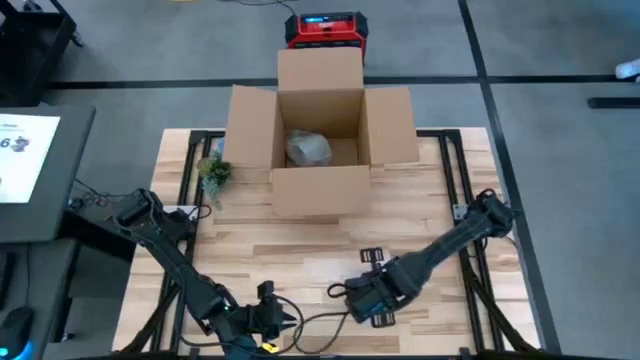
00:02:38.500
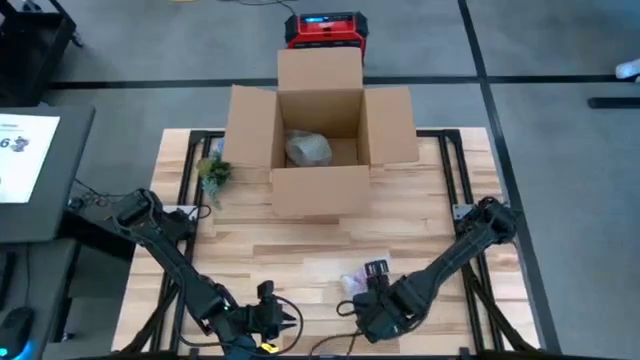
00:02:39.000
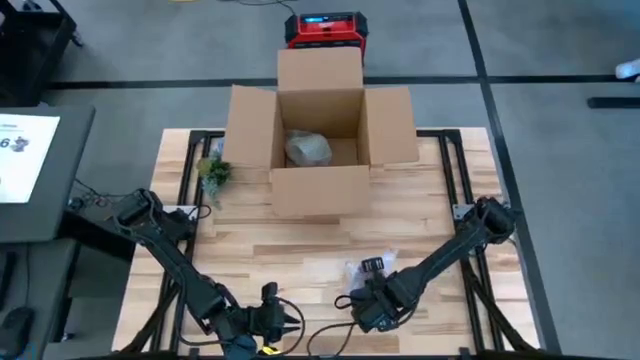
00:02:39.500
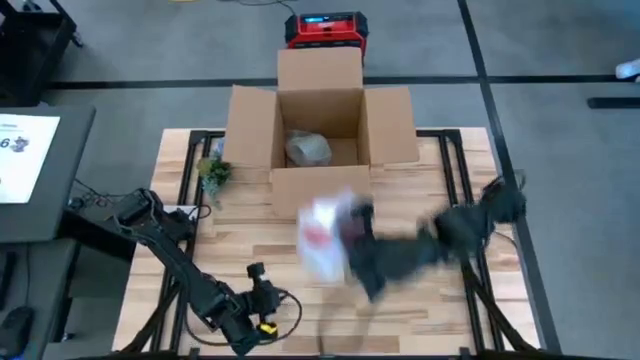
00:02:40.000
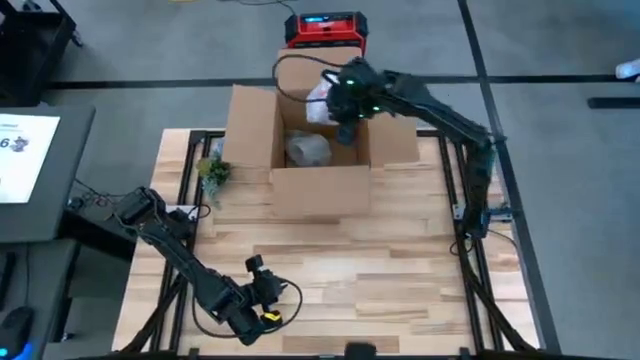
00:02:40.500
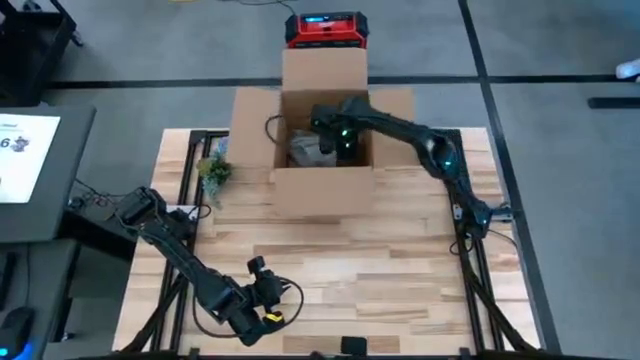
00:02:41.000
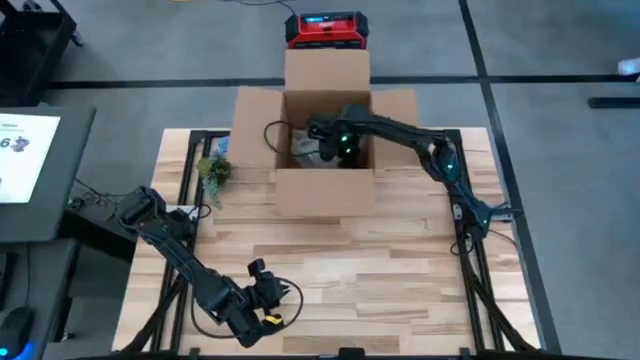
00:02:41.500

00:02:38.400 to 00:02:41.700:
Task: wrap mug
Put the wrapped red mug into the box

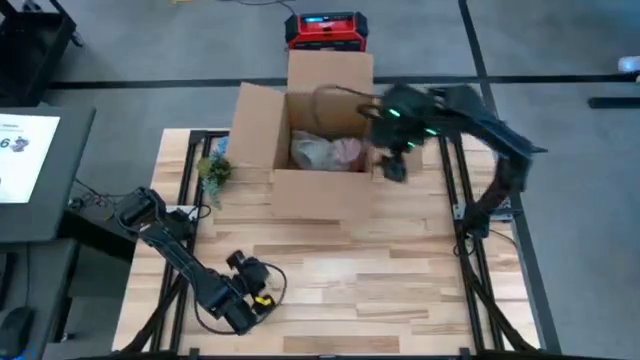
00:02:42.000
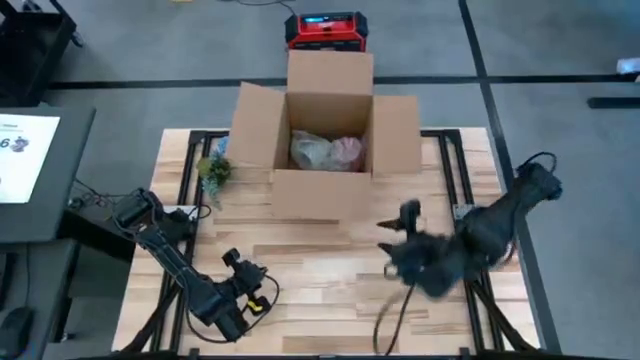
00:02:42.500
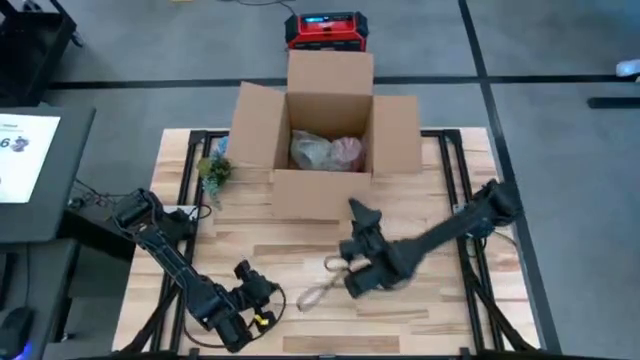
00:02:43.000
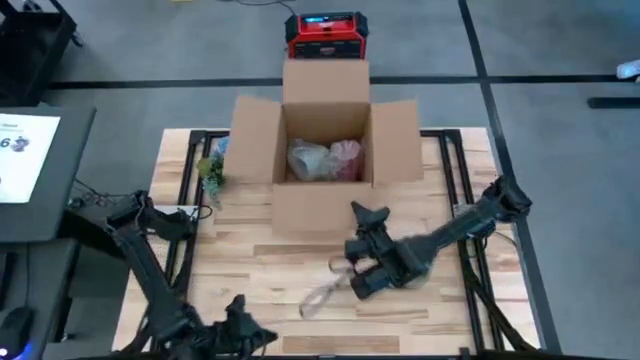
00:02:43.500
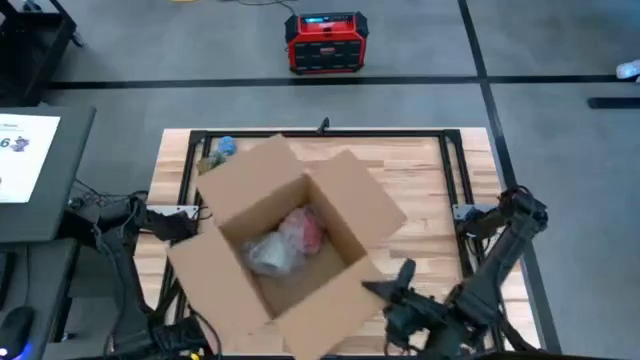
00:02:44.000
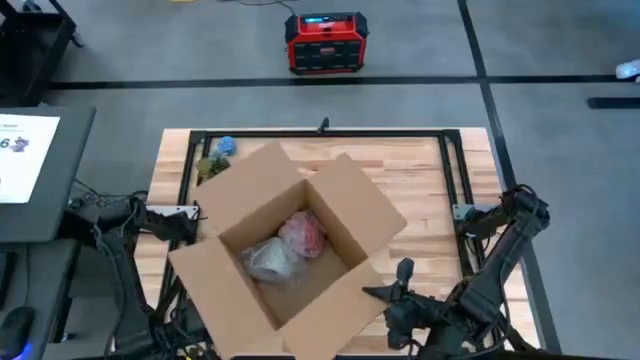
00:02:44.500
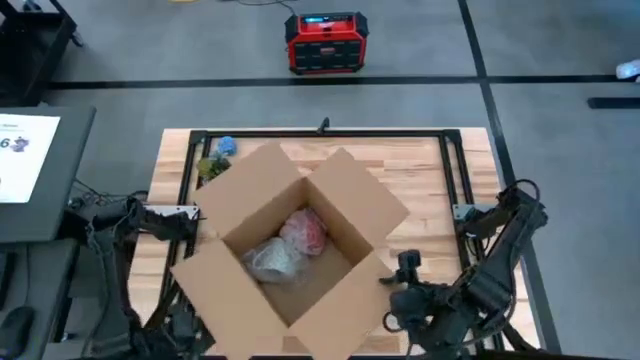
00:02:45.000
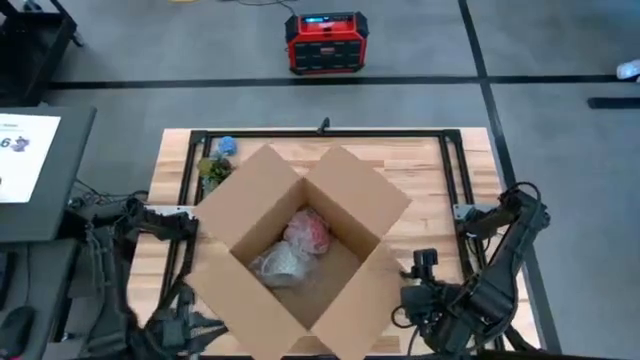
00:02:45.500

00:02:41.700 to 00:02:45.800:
Move the box to the center

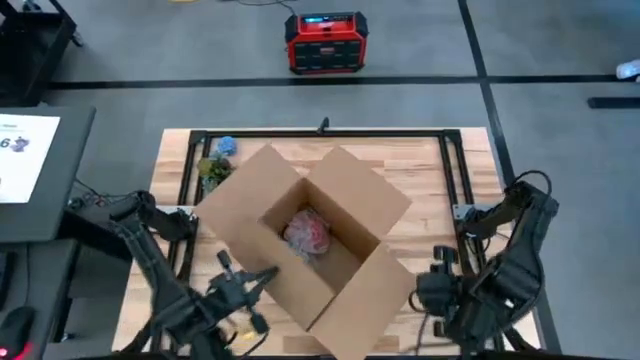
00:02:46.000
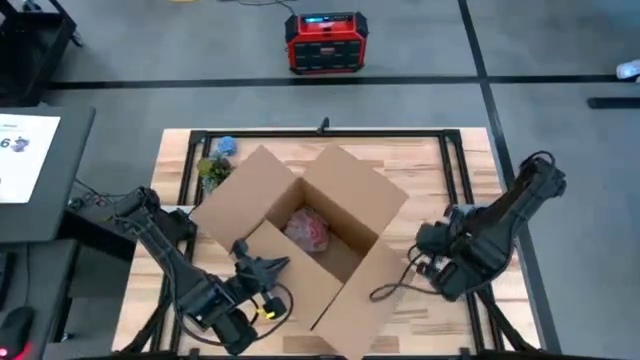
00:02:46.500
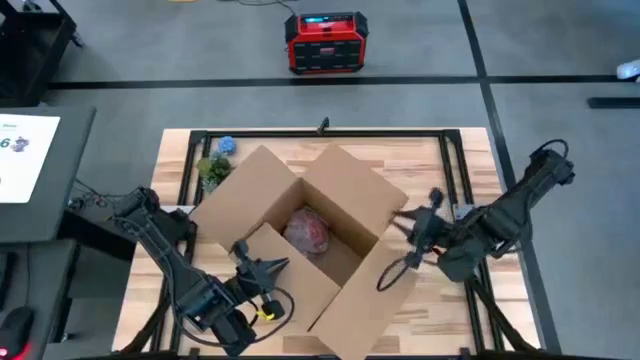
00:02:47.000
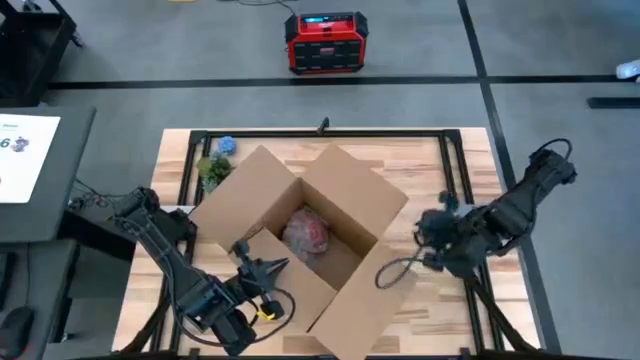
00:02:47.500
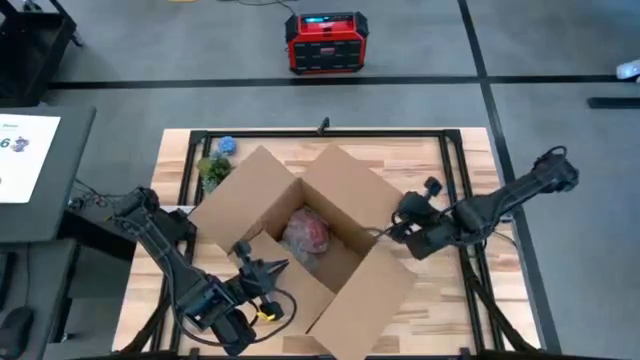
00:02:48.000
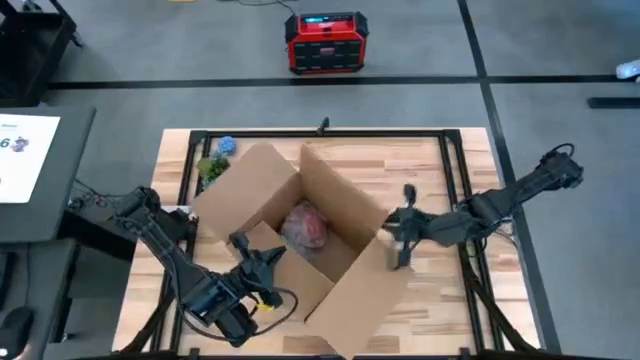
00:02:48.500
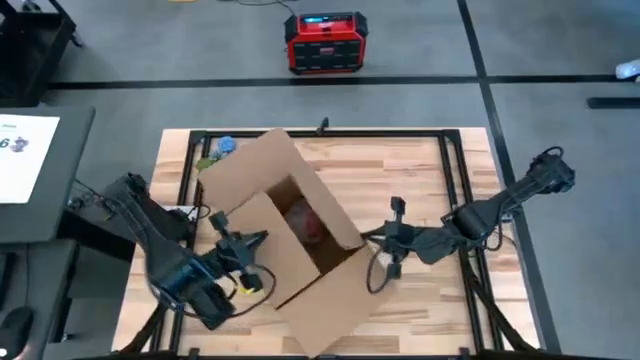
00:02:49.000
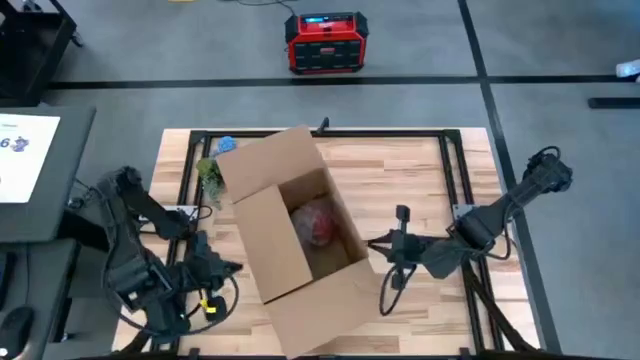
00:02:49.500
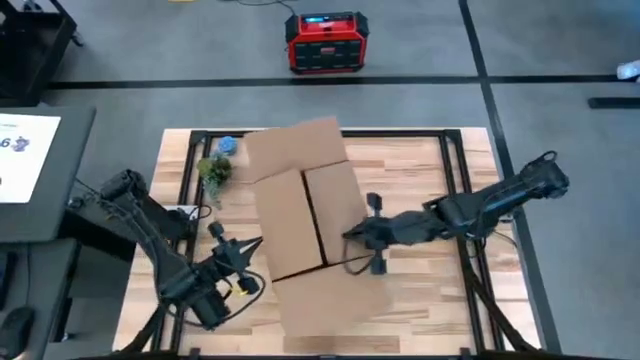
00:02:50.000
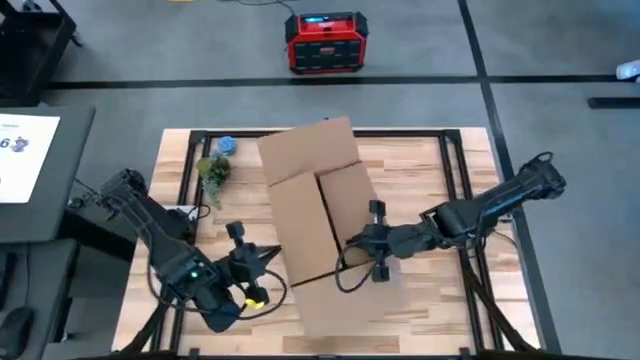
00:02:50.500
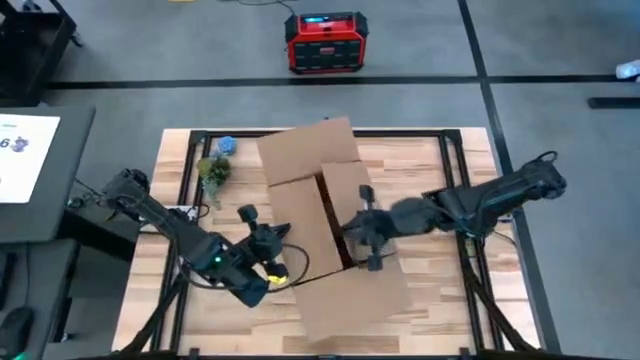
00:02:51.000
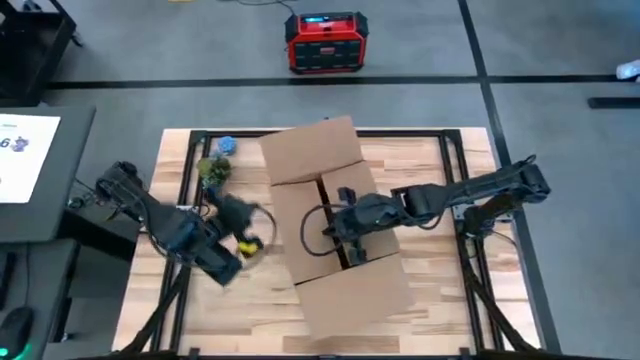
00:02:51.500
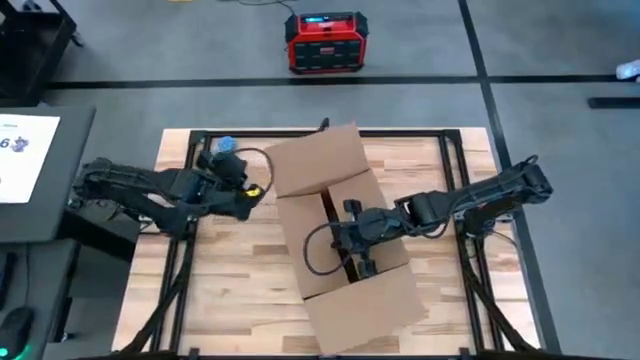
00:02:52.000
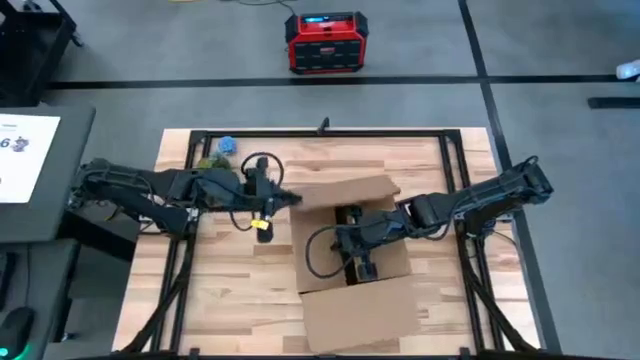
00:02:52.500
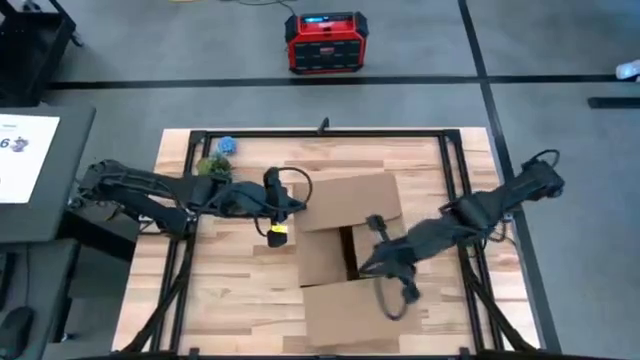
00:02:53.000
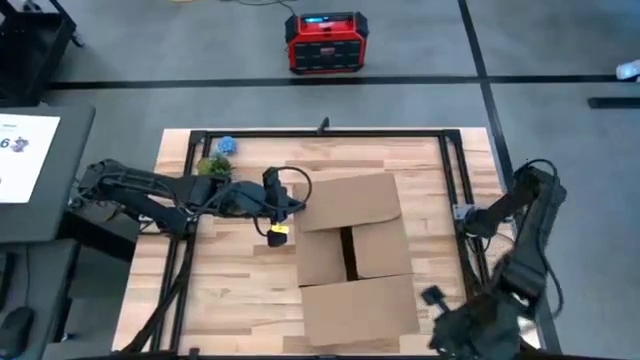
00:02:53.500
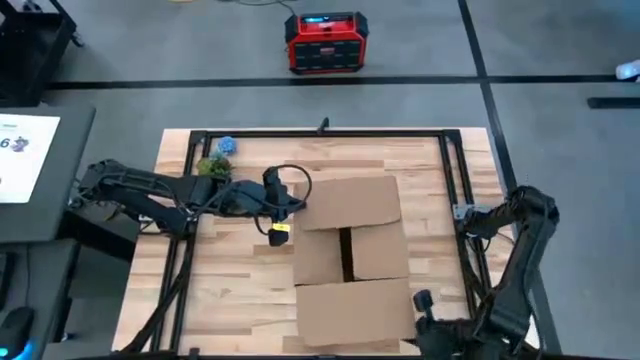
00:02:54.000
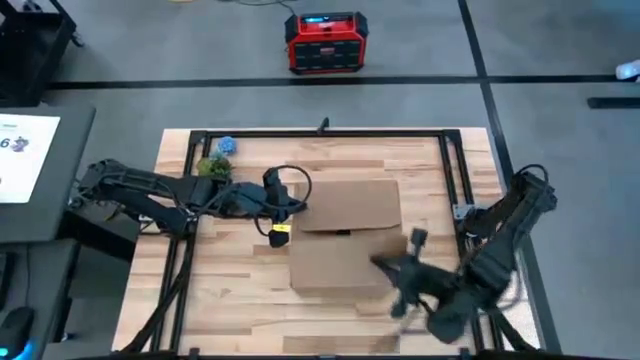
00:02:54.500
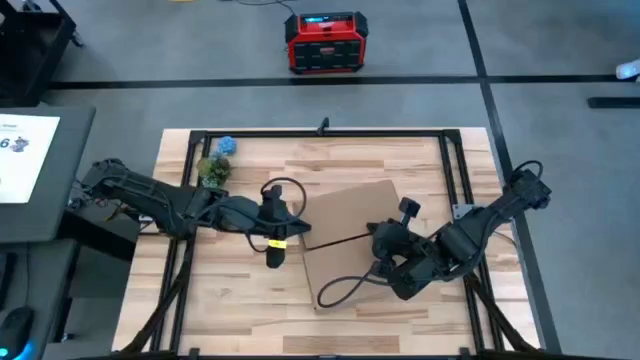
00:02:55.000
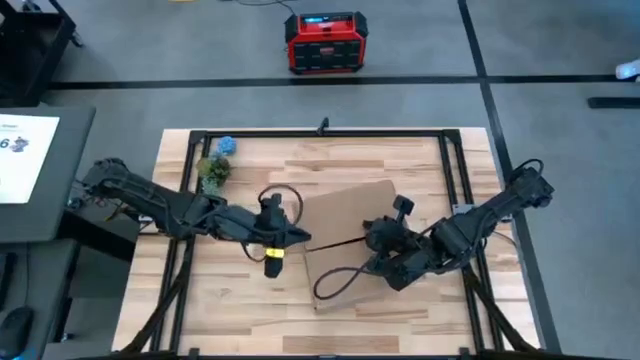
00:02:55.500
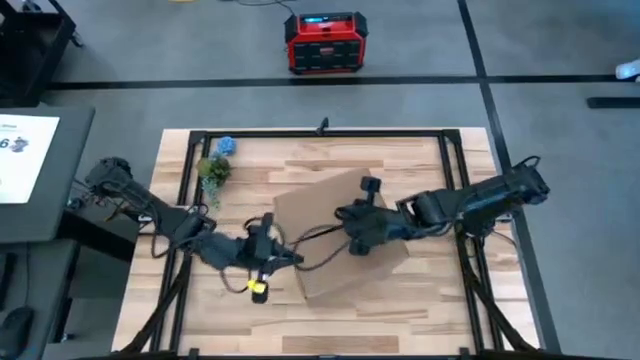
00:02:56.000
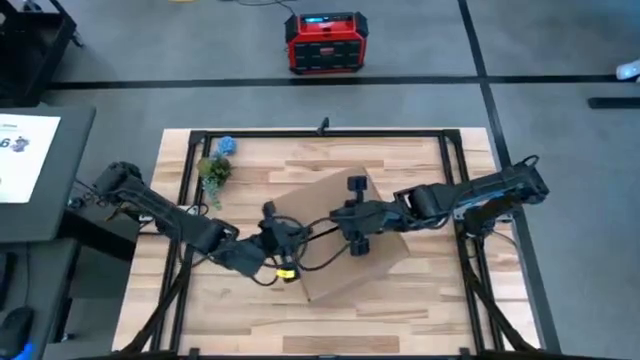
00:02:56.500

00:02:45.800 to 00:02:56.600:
Close the box

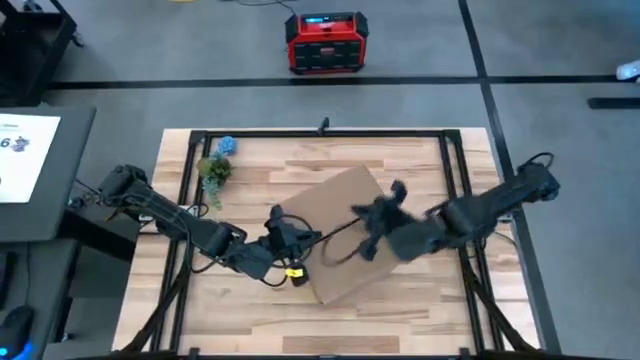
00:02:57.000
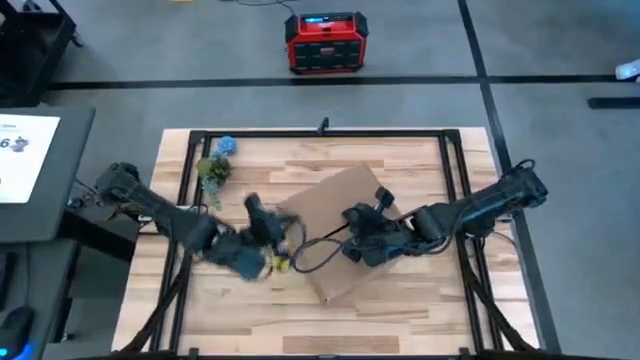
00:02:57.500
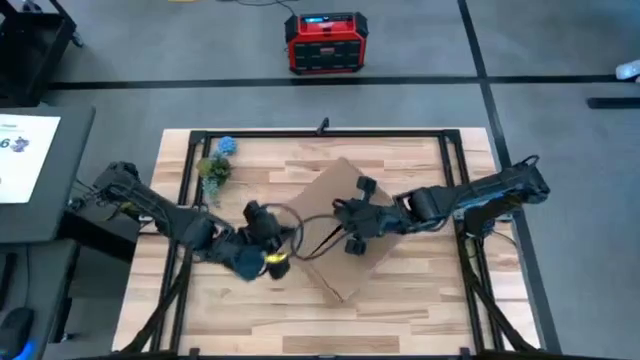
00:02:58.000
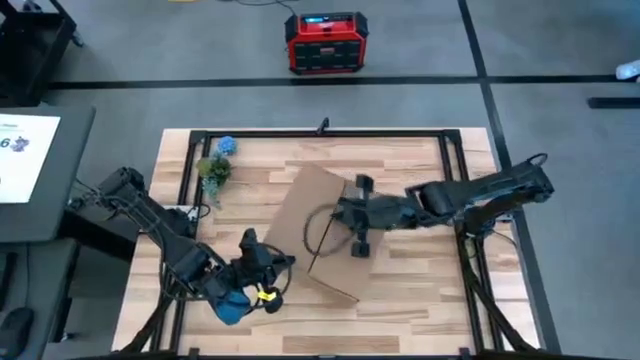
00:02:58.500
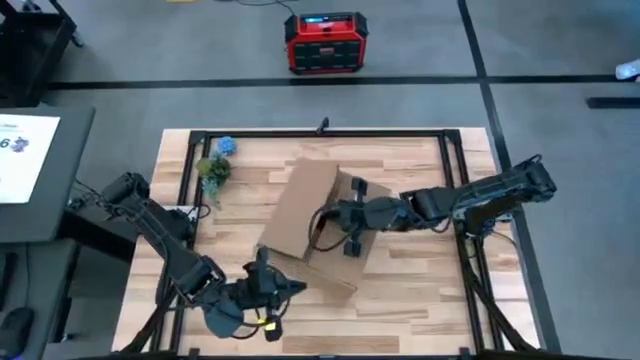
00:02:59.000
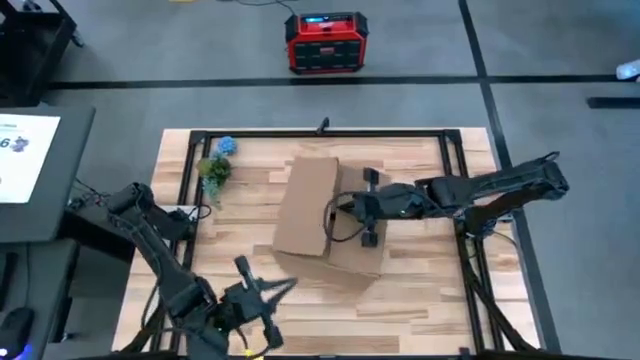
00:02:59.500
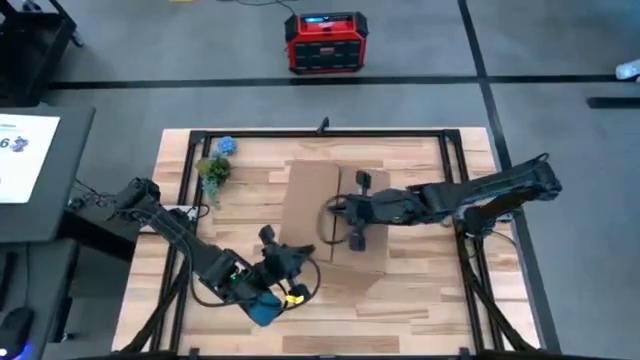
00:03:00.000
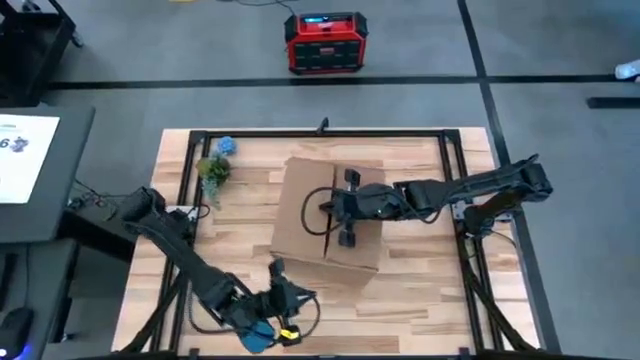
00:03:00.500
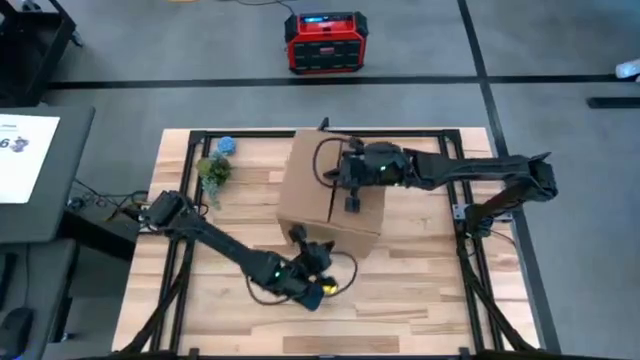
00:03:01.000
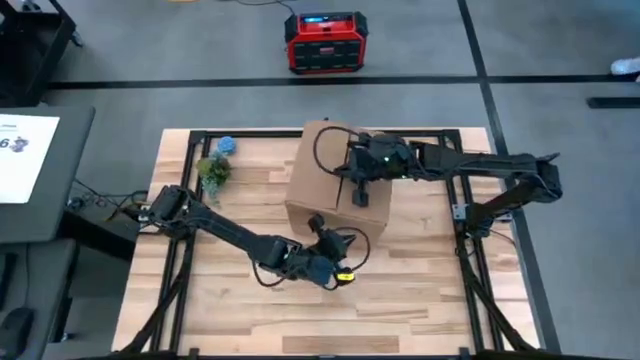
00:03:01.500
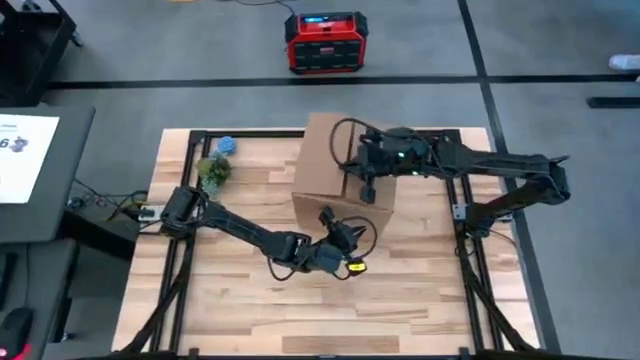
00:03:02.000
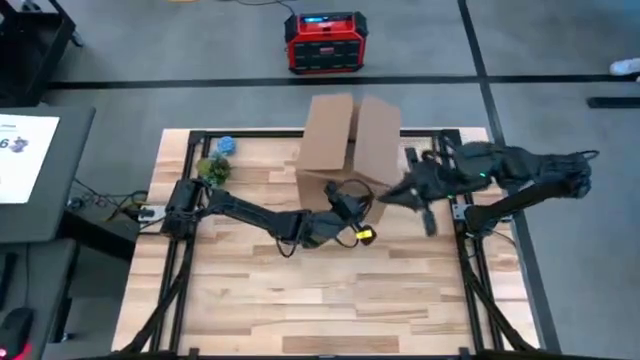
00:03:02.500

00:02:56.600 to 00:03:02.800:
Move the box to the top
